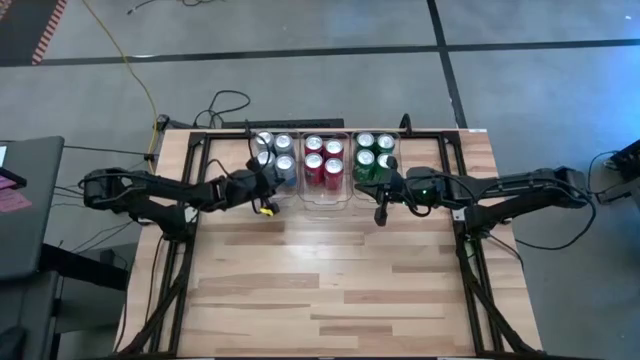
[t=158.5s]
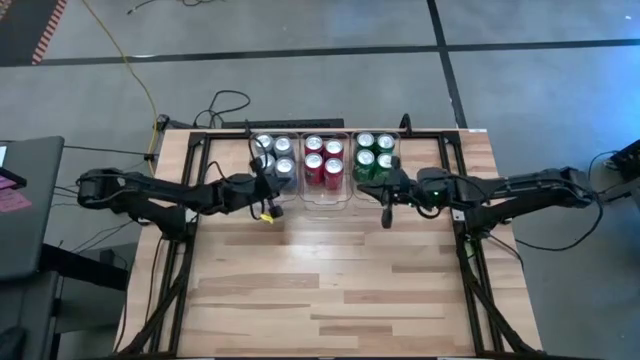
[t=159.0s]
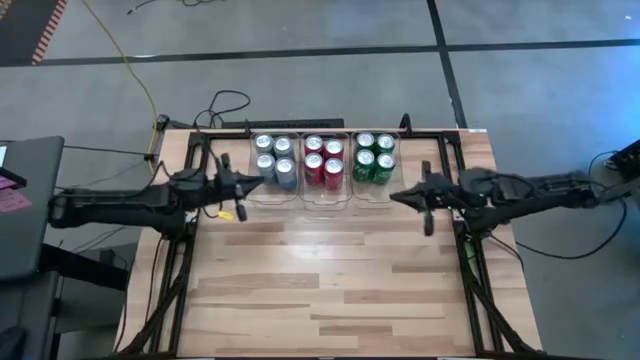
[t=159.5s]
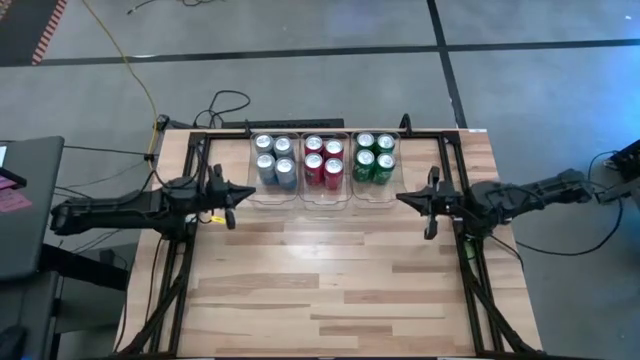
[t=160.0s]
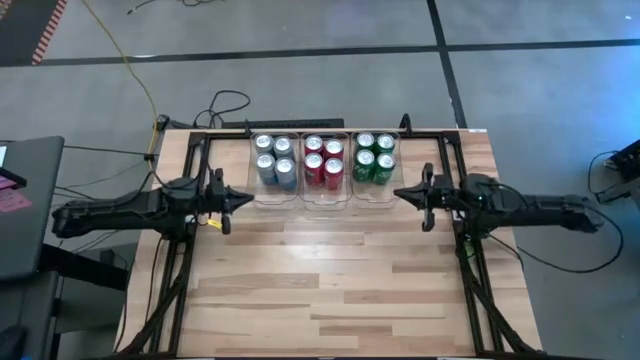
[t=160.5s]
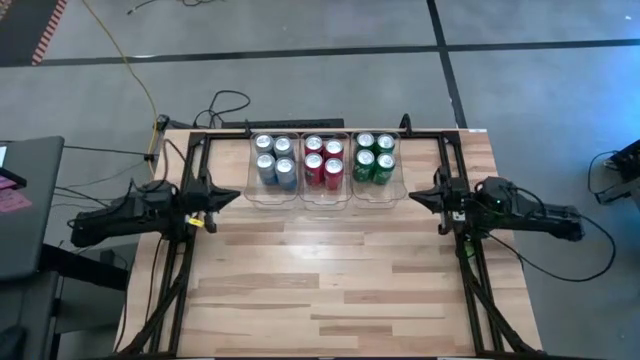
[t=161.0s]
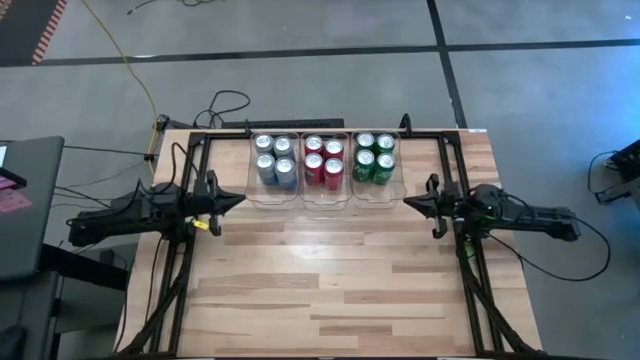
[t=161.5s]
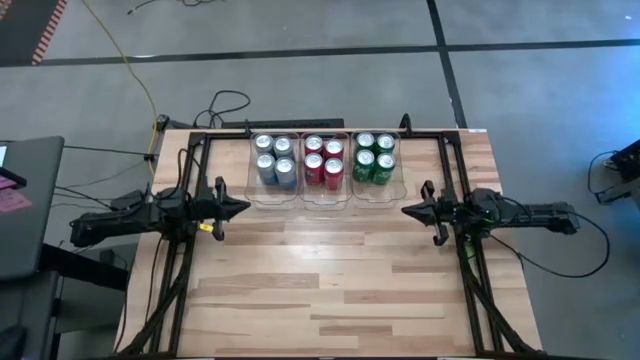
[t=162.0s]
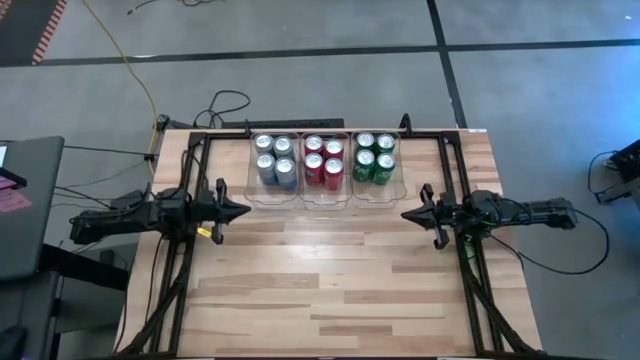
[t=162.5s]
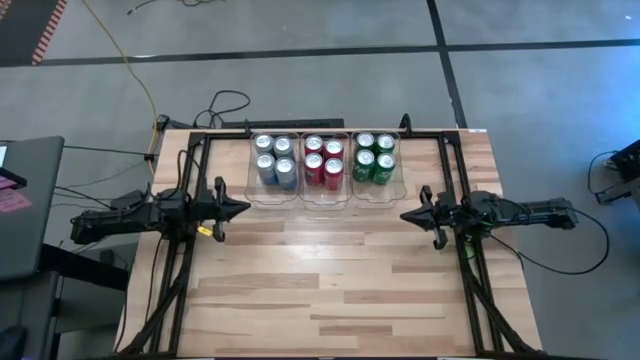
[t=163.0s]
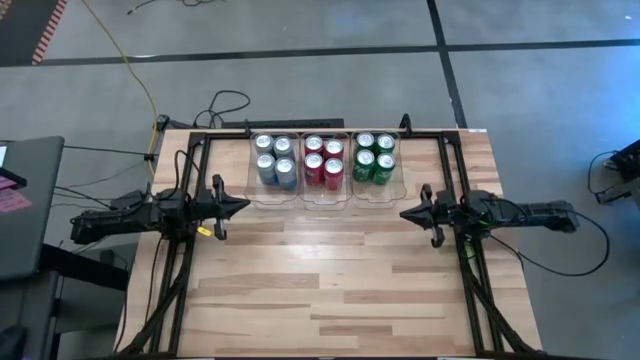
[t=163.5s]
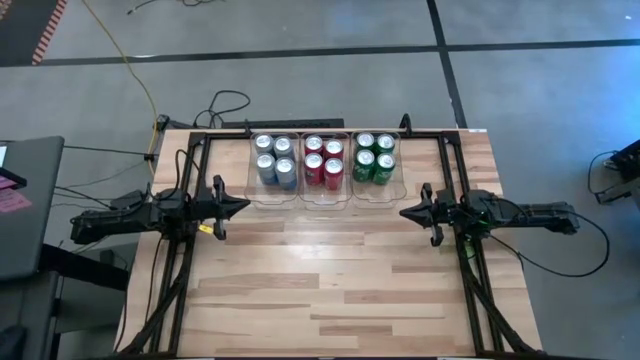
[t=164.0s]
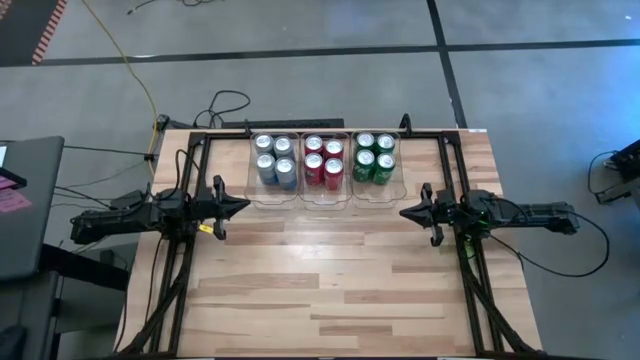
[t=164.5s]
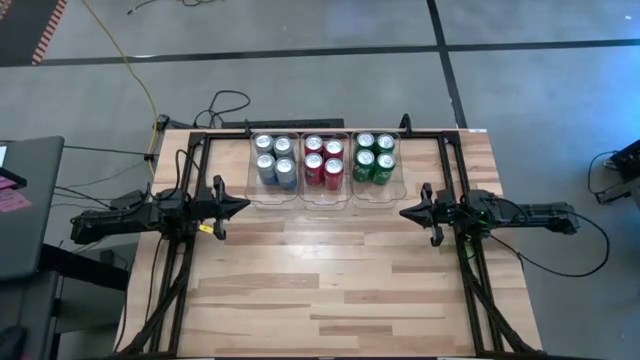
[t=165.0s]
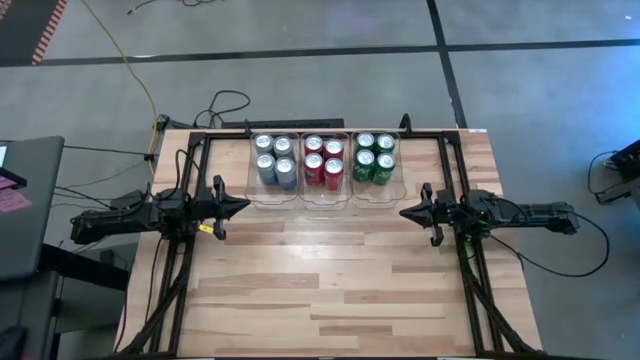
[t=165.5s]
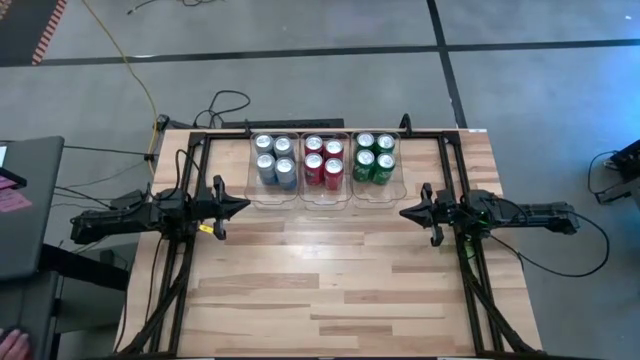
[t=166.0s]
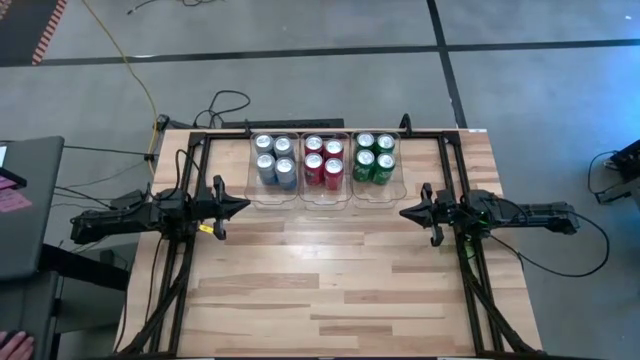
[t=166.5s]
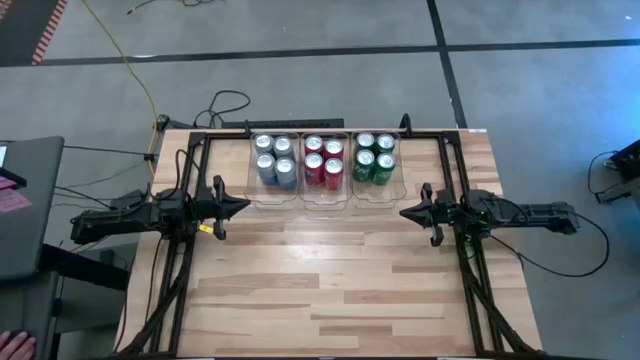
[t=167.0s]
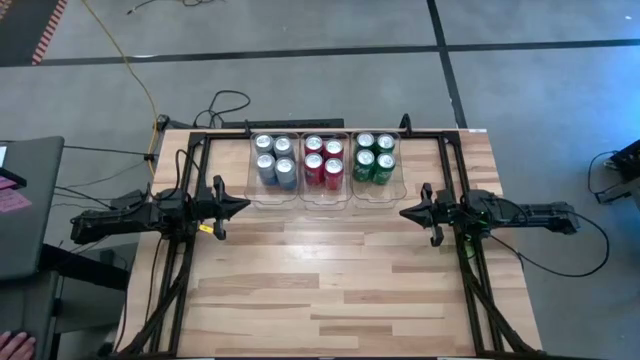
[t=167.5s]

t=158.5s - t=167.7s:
Task: Sort soda cans
Return to Home Position

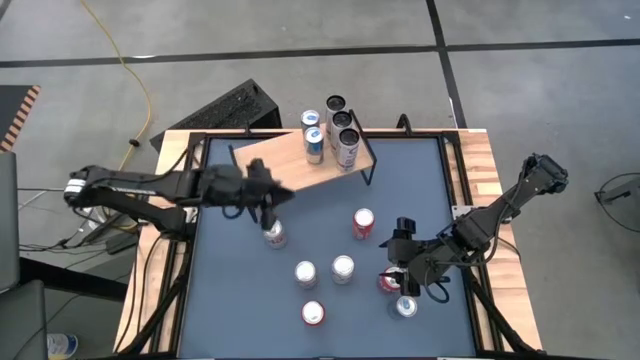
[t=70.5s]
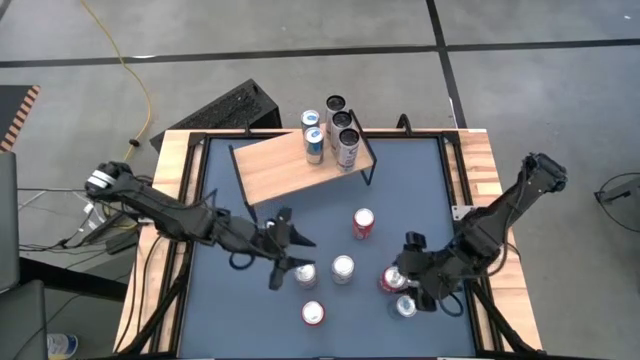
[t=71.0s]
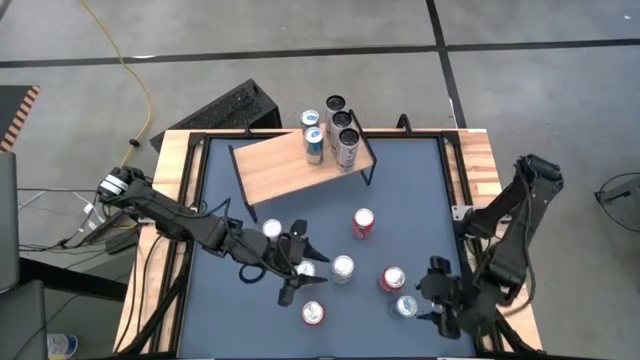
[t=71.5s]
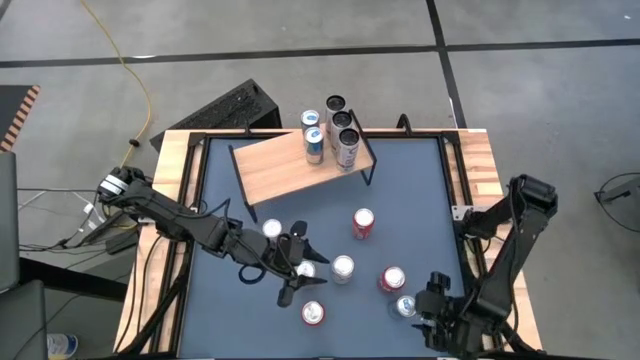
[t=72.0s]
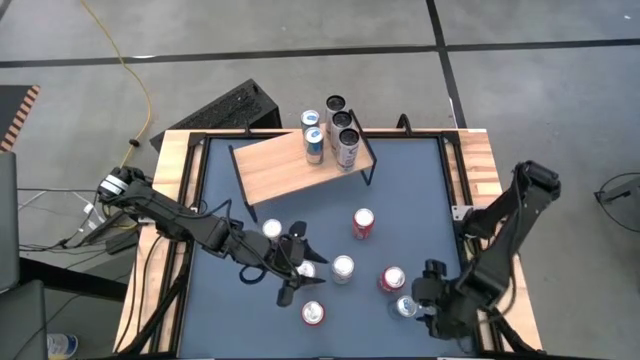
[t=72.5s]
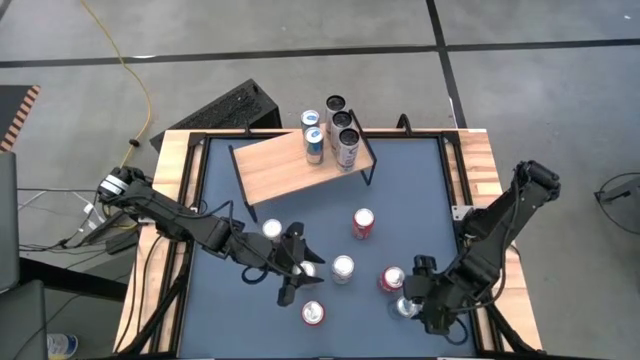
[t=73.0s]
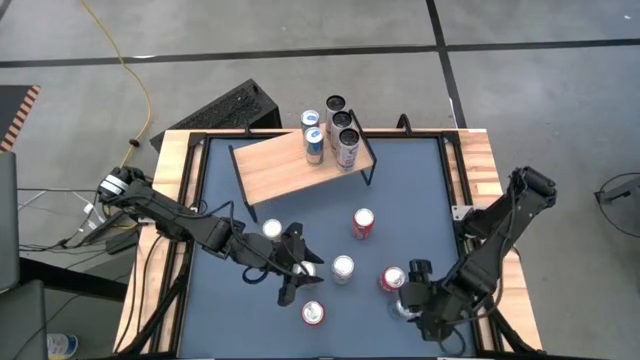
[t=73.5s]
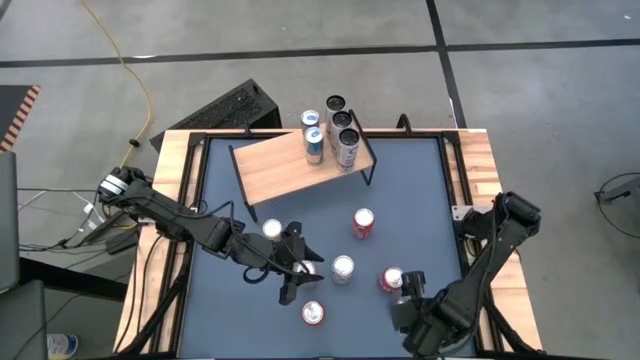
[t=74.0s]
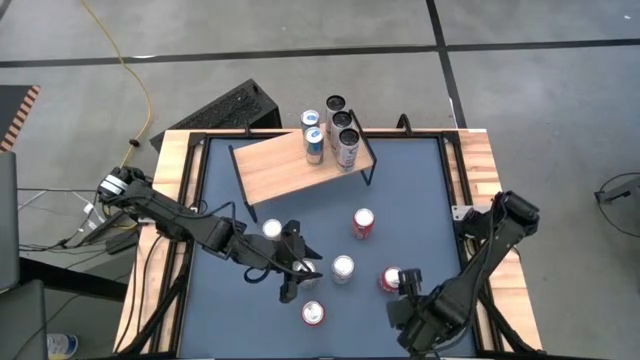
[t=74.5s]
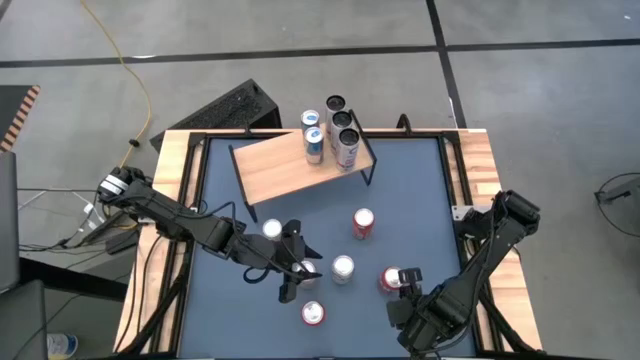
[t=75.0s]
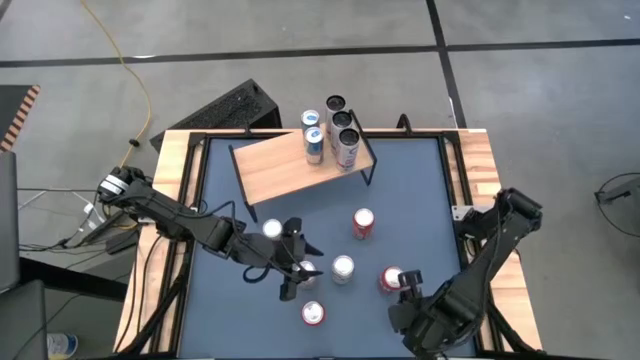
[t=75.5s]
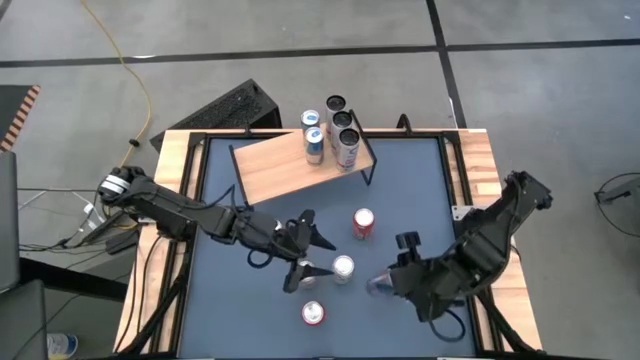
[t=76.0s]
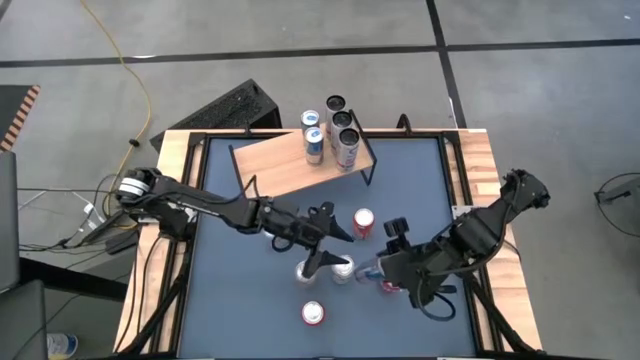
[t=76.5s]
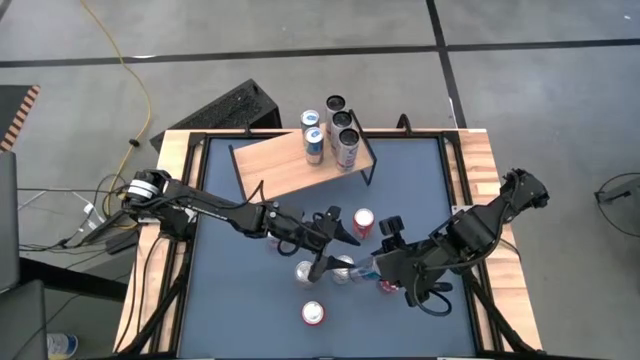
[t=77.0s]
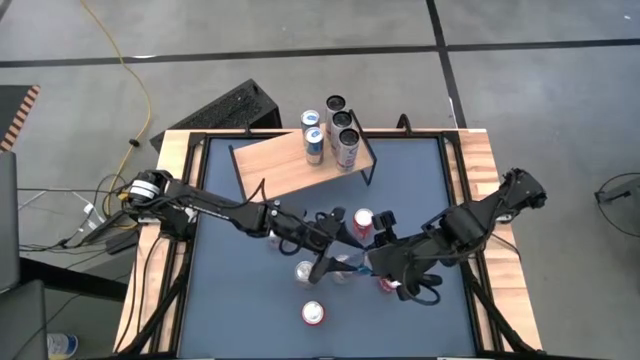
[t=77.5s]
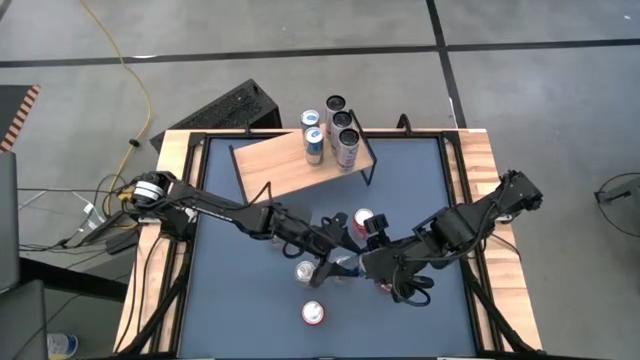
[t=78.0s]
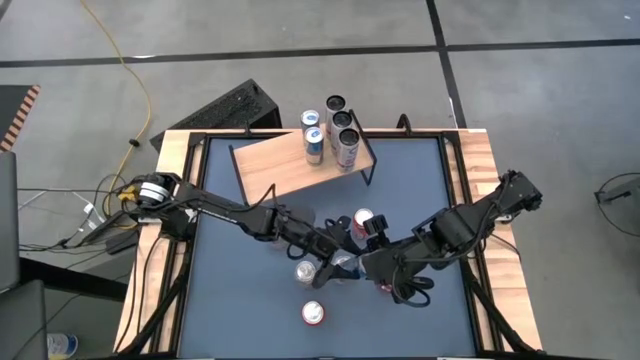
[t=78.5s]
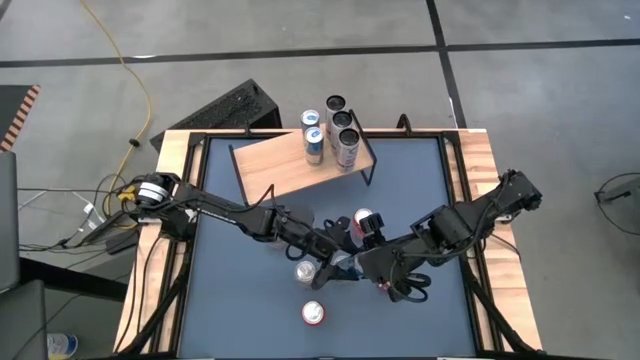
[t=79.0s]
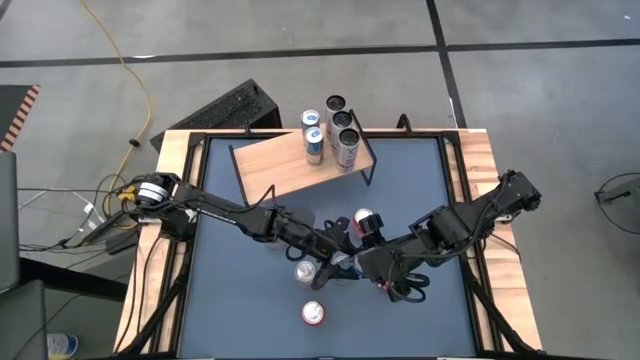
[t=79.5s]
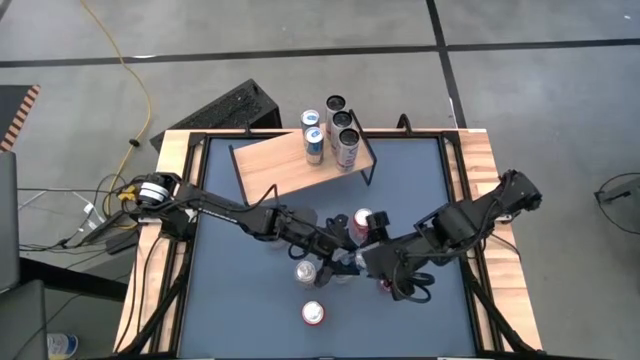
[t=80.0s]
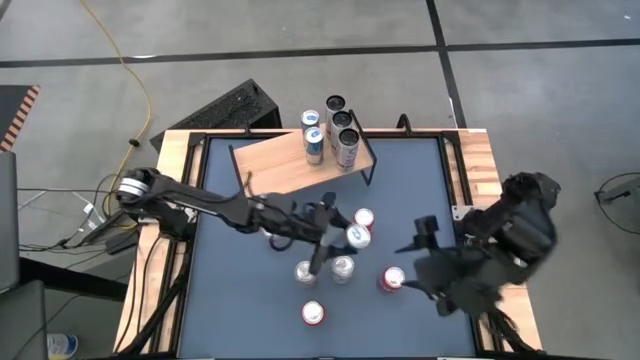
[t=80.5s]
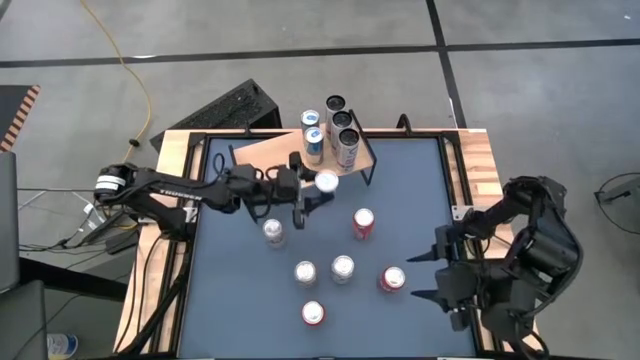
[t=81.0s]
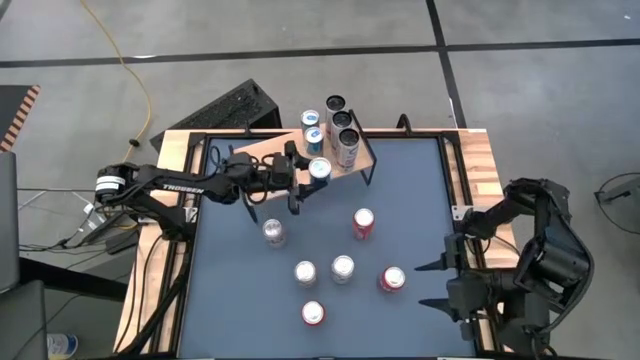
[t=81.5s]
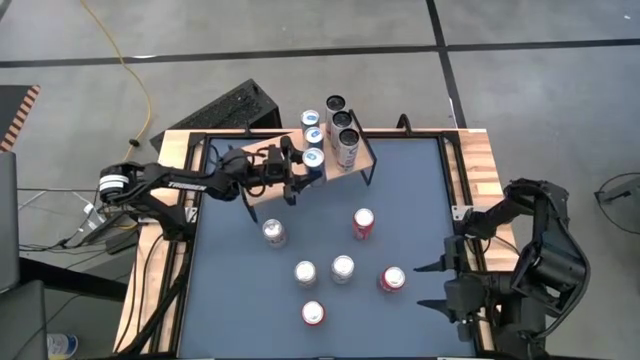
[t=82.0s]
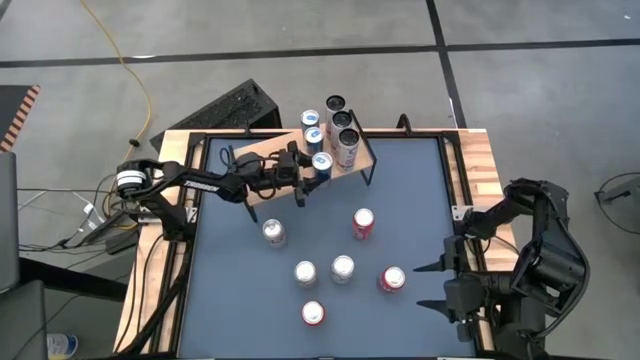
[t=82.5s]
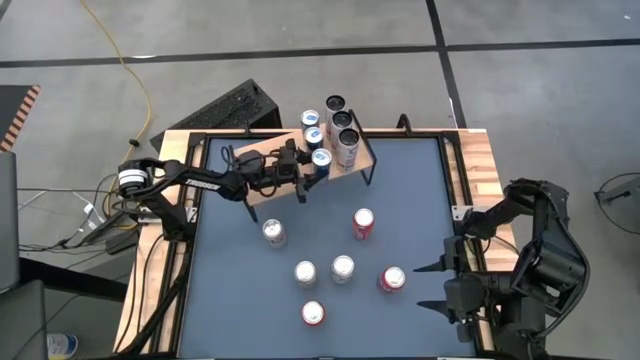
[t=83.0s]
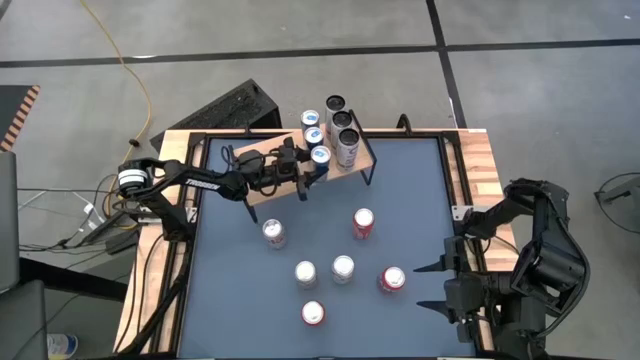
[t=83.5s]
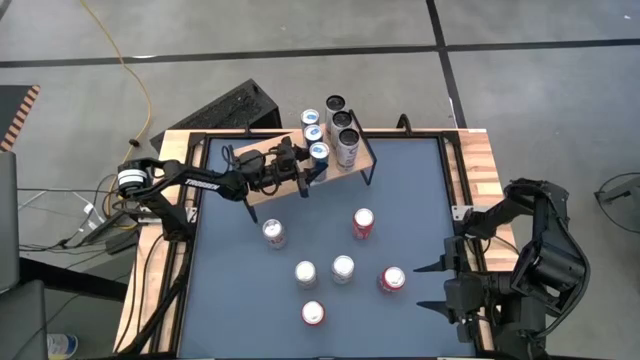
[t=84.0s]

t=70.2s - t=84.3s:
Task: Place canned beverage on shelf
Put the blue soda can on the shelf aligned with the other blue soda cans
